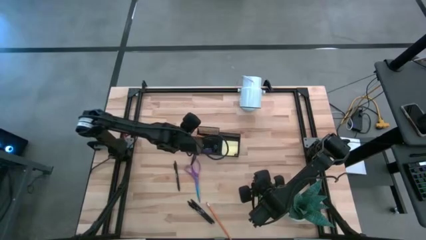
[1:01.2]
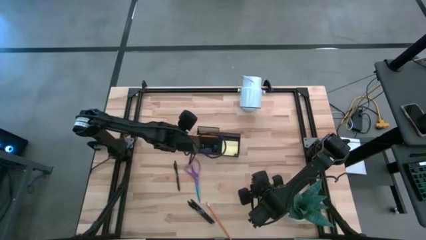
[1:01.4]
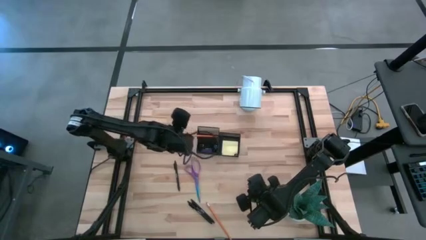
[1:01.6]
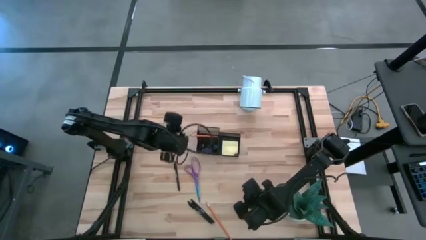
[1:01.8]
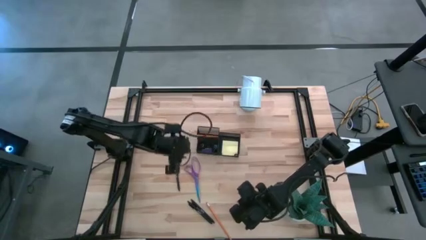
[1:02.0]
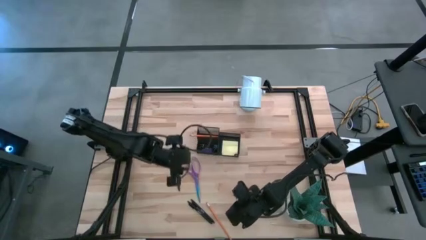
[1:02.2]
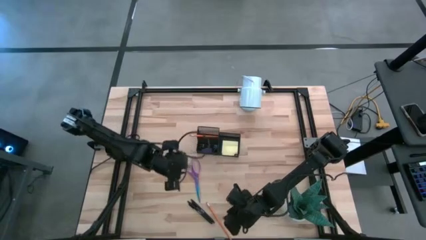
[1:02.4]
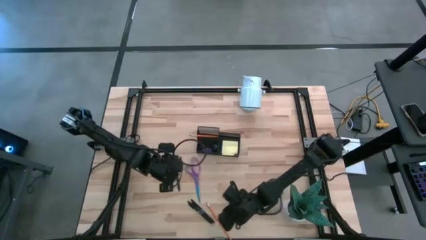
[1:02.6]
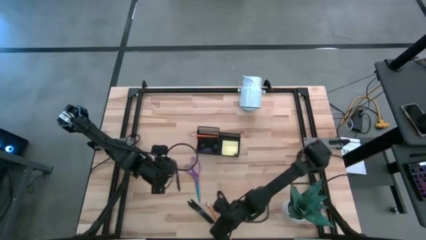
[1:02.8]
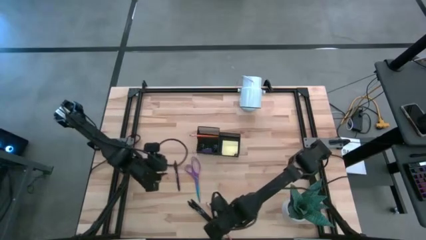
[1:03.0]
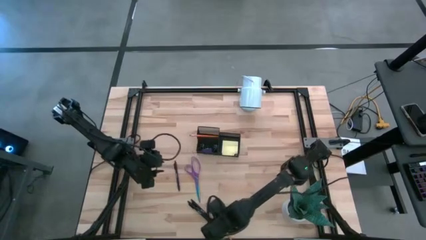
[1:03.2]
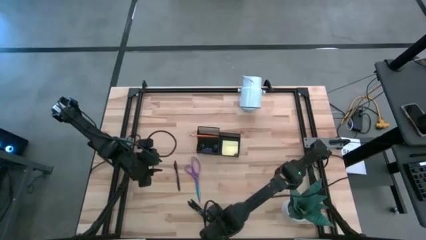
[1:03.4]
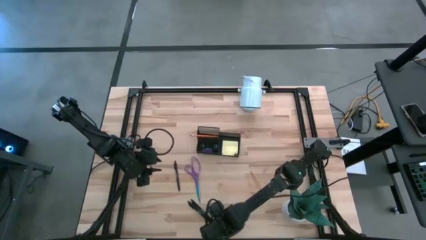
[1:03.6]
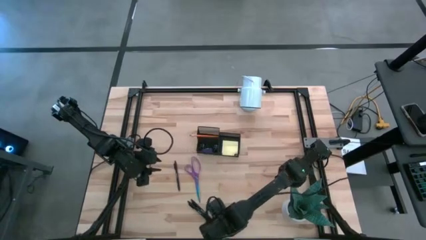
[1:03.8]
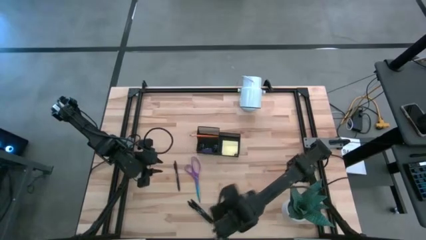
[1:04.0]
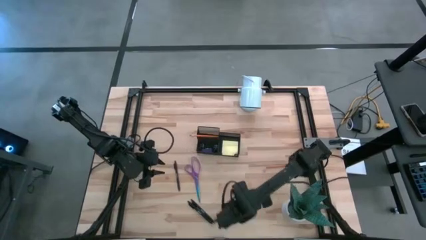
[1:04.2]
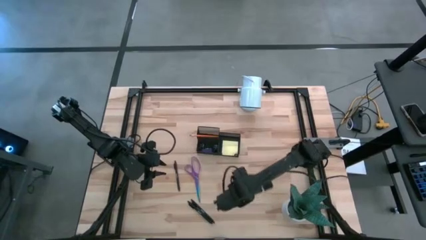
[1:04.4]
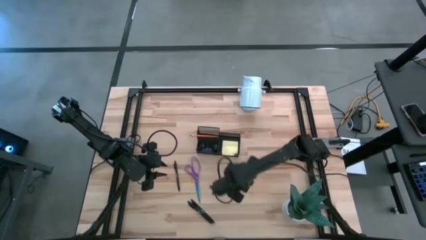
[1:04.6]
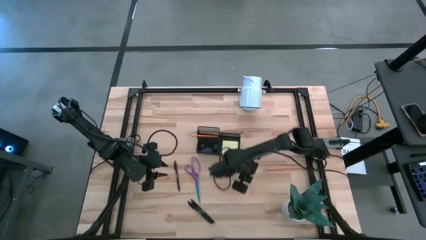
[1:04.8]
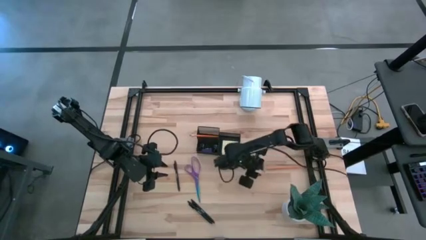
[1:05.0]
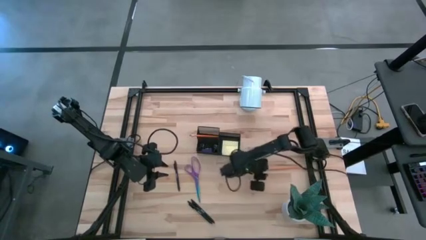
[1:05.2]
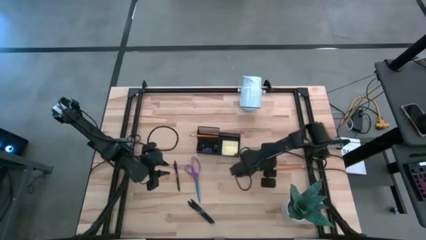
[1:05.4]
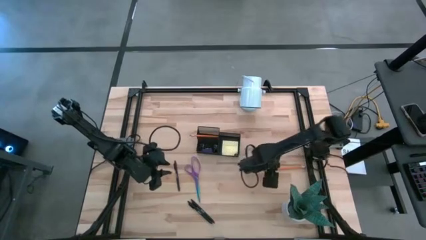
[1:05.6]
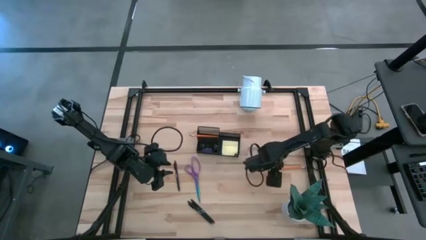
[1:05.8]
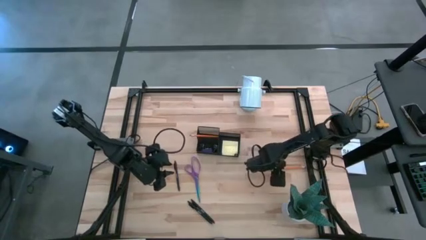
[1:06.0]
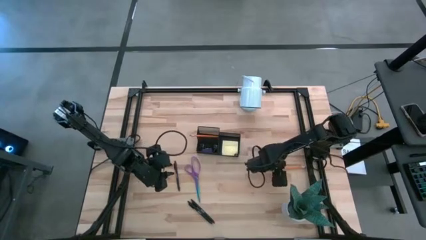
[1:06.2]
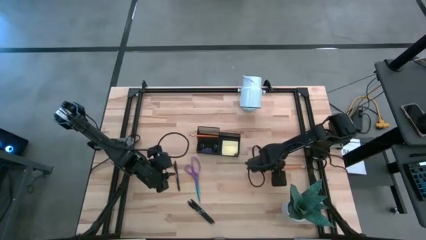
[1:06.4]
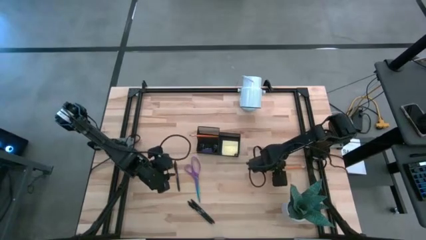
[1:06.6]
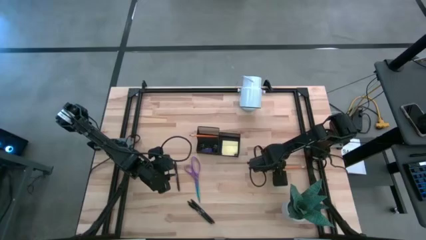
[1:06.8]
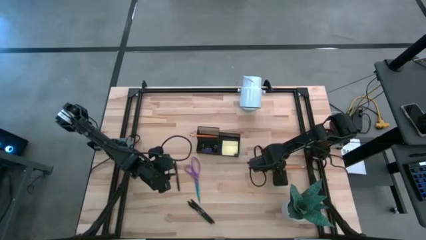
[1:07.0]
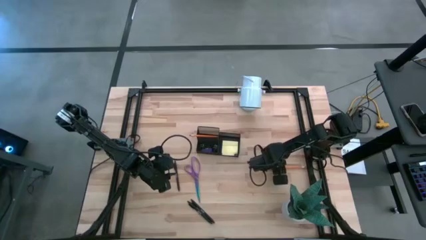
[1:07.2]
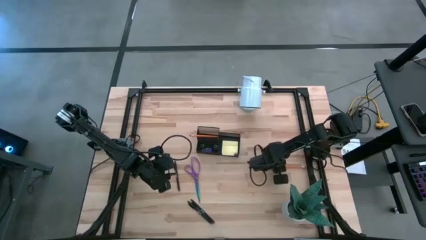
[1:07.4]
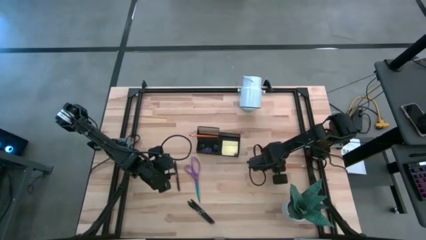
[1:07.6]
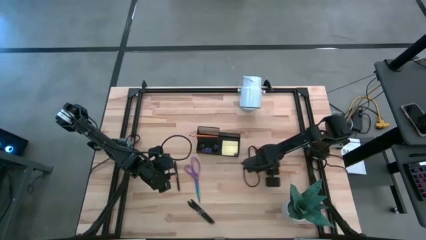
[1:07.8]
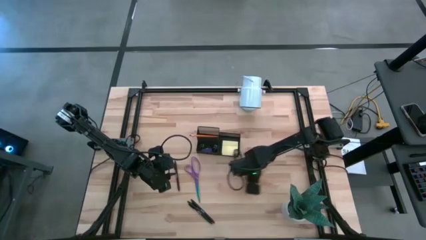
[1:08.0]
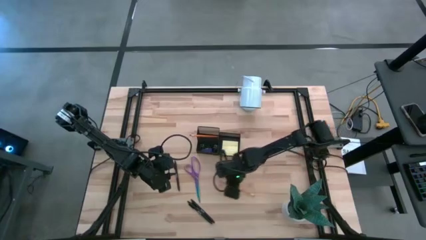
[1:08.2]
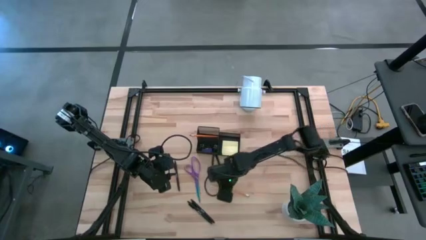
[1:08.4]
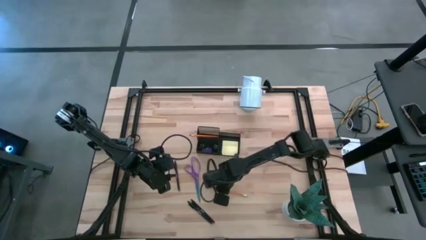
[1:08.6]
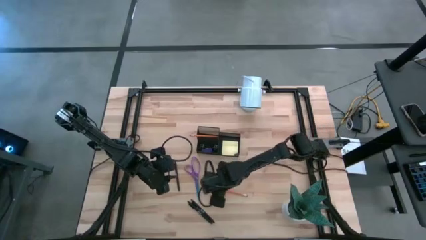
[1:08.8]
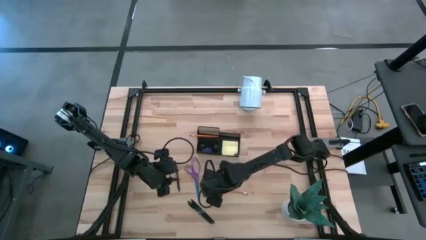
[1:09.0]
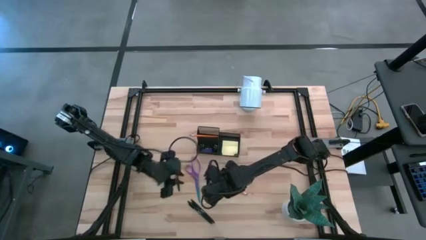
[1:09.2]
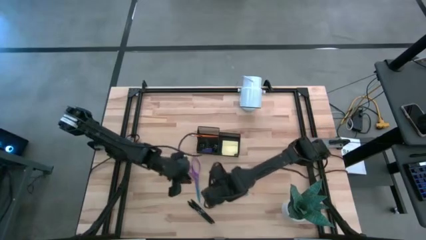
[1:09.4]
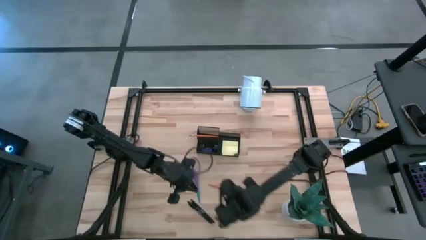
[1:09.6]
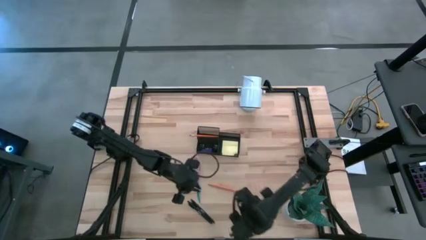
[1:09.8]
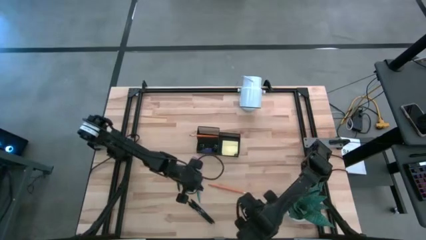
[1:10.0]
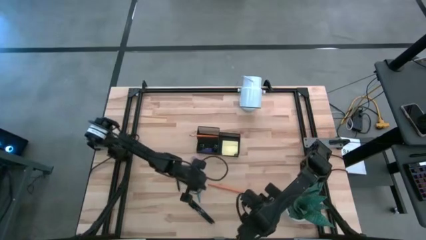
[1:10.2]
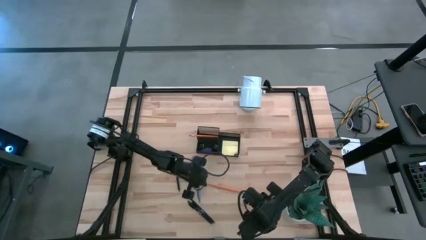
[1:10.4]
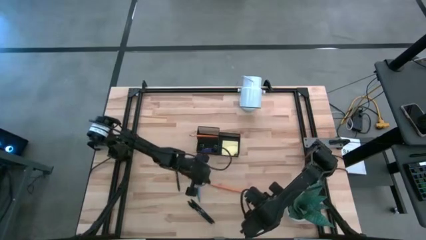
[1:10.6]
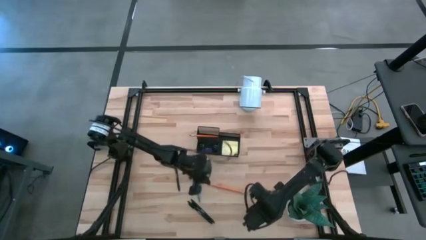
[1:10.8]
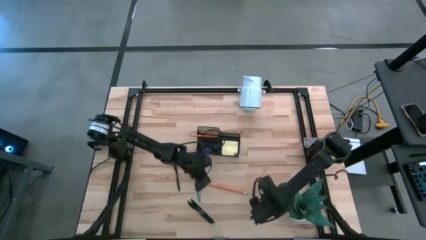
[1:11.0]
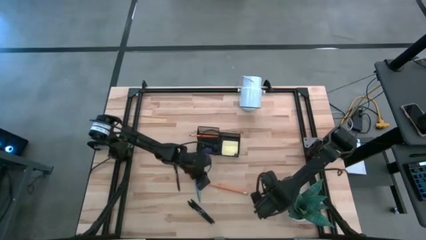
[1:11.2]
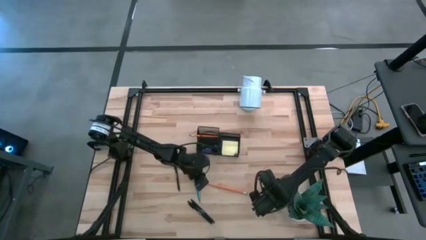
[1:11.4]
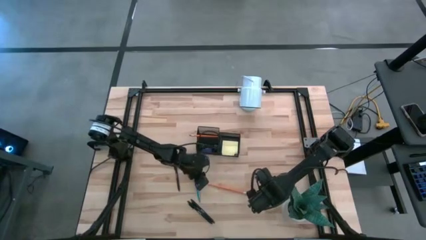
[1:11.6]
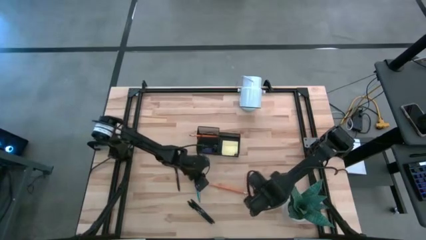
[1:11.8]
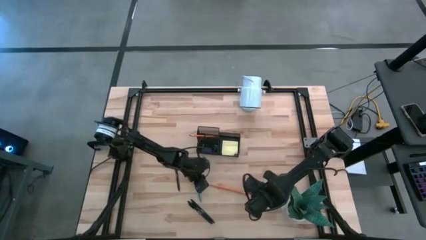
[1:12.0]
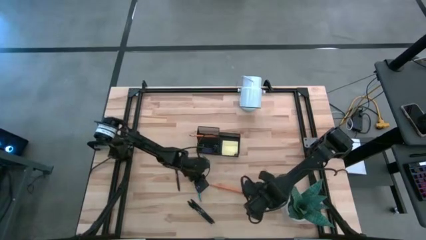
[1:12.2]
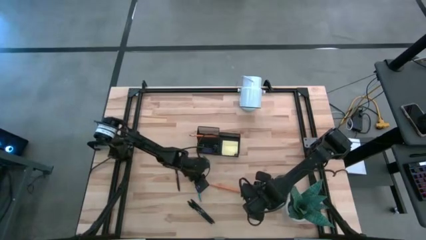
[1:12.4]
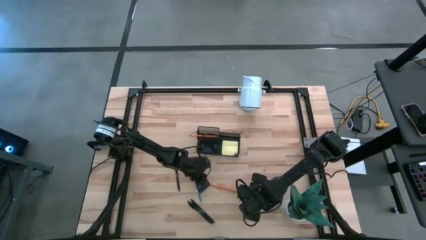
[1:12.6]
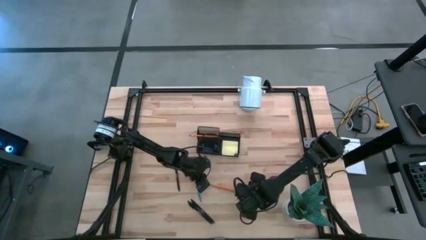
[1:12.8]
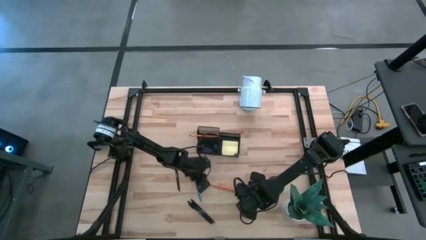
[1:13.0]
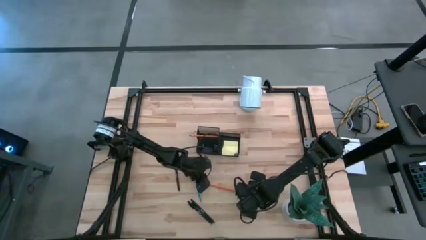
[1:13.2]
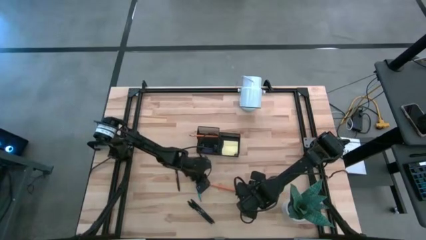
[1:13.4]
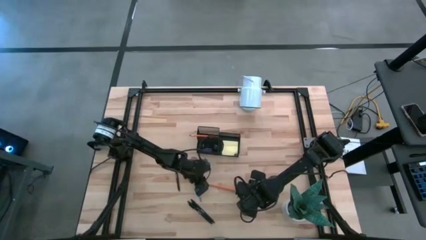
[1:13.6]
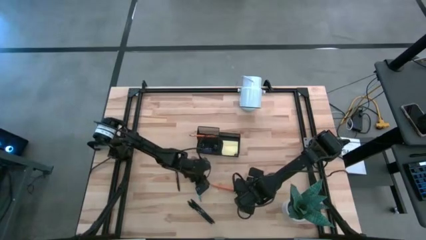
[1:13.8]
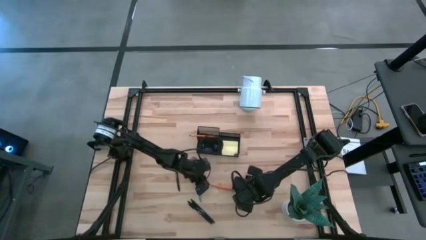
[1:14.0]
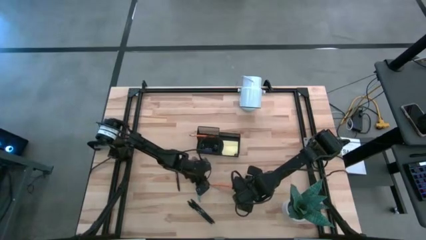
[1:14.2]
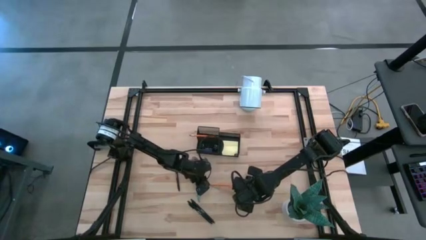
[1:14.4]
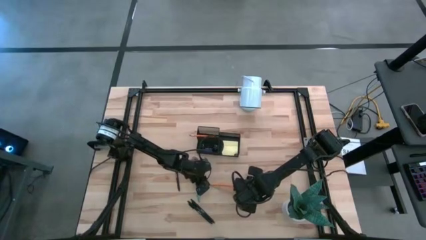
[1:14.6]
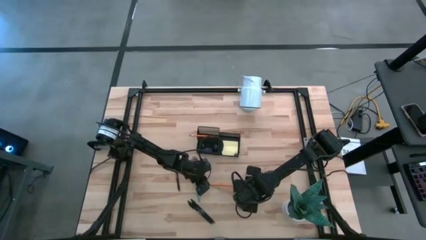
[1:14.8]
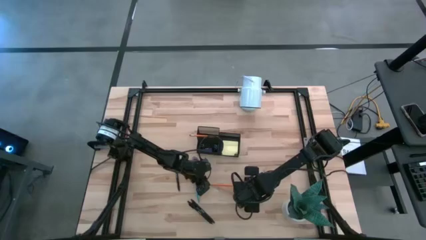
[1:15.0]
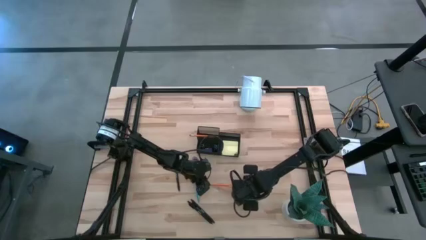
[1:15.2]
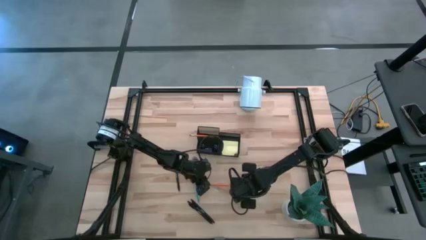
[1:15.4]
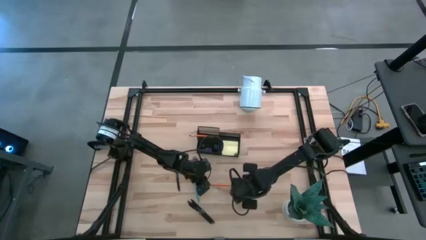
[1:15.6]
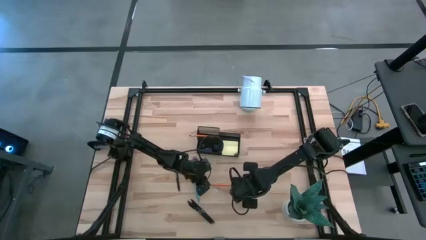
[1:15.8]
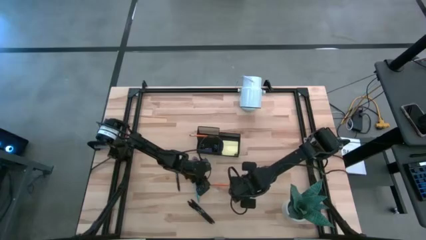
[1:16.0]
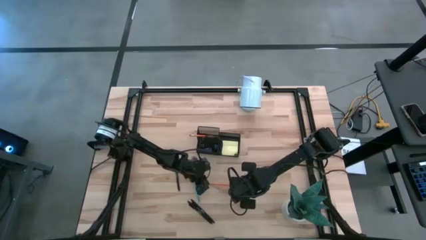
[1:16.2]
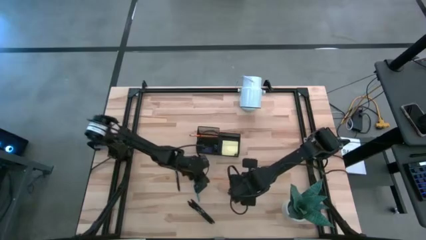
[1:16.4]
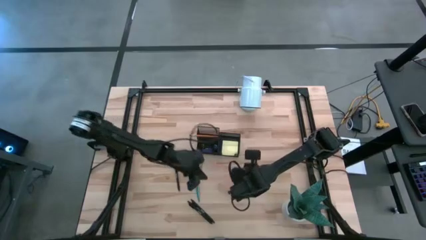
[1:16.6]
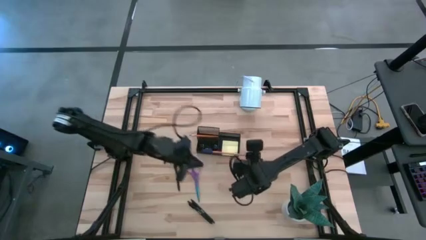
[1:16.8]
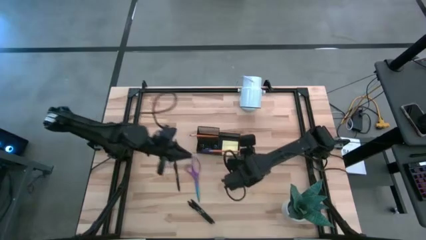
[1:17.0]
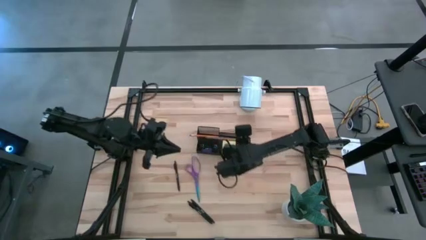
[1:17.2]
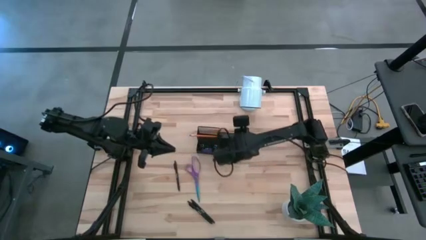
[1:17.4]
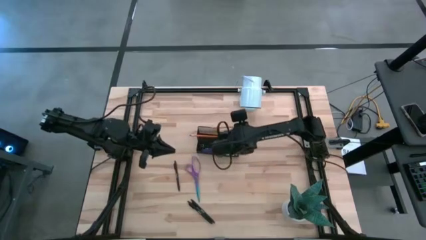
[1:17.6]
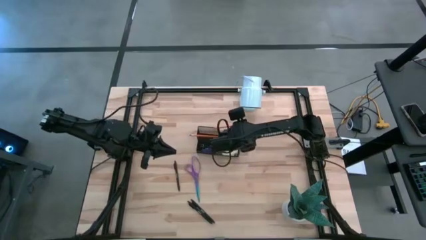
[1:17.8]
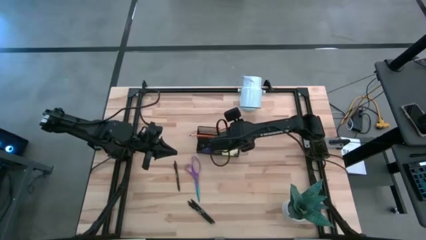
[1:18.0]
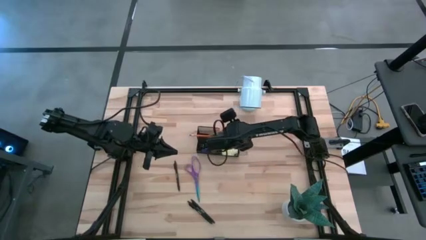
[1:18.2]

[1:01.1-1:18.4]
Task: Pick and place office supplies into organizer
Put the yellow pencil into the black desk organizer
